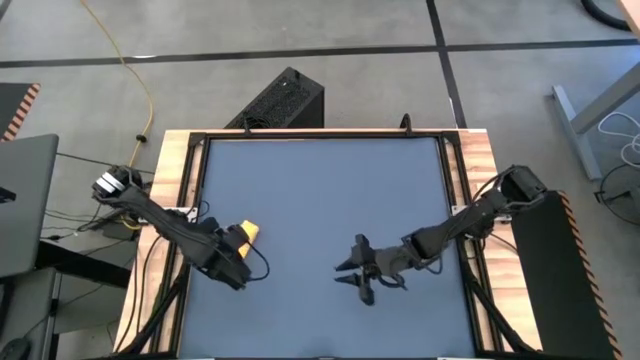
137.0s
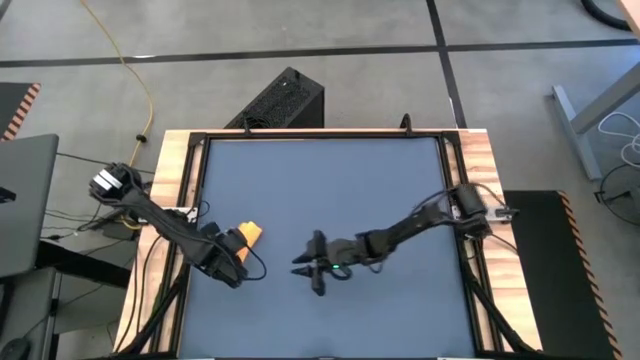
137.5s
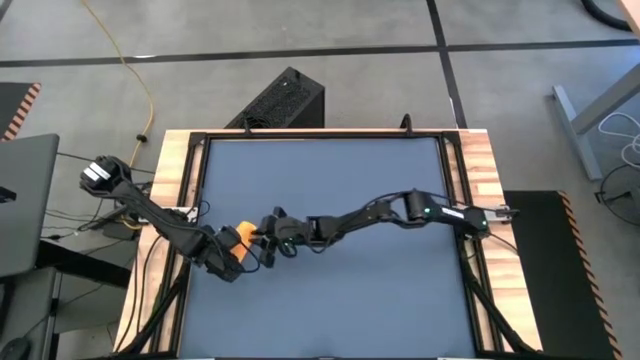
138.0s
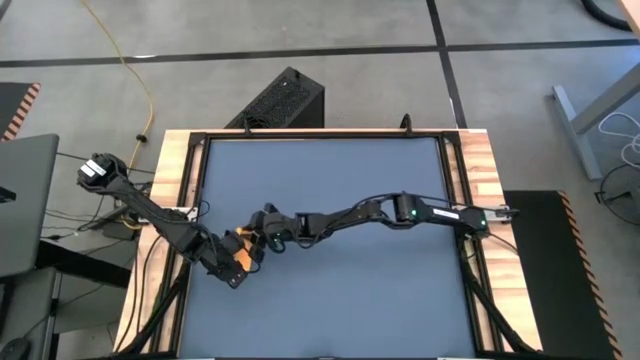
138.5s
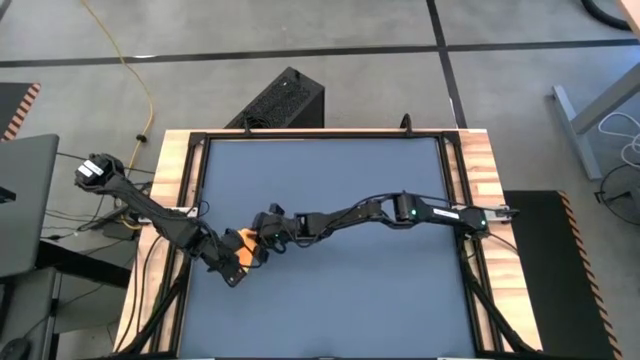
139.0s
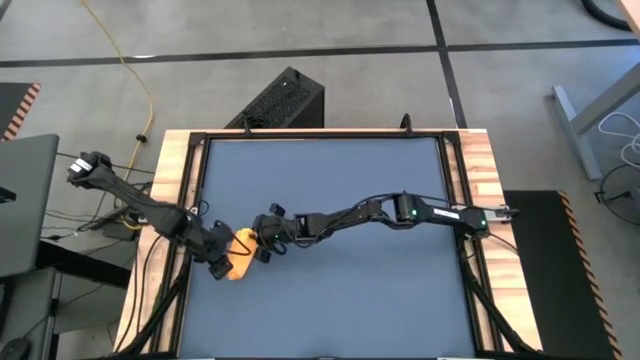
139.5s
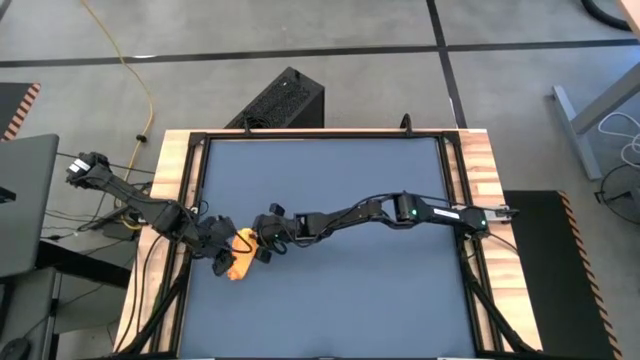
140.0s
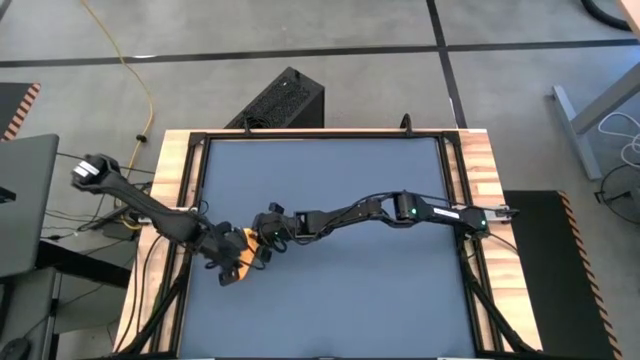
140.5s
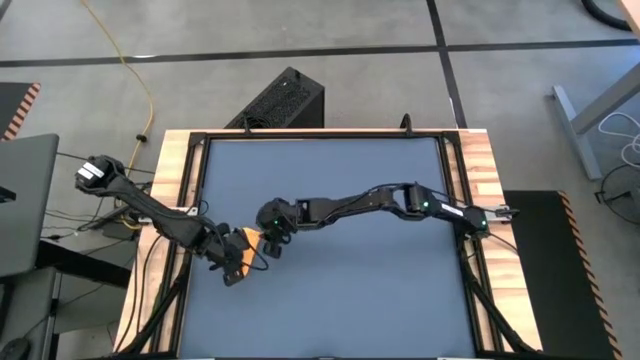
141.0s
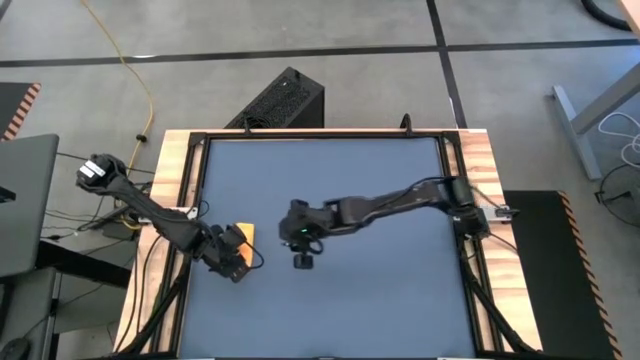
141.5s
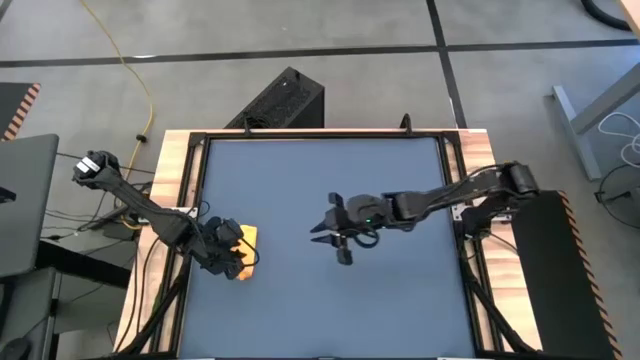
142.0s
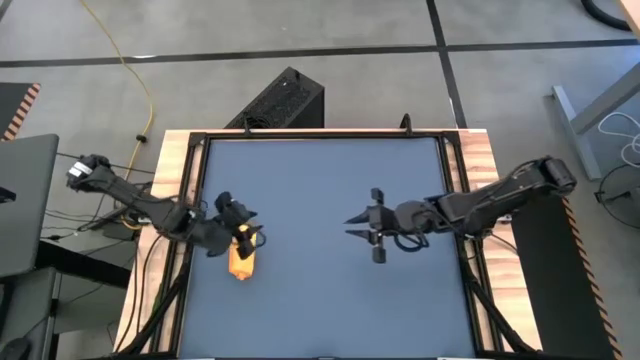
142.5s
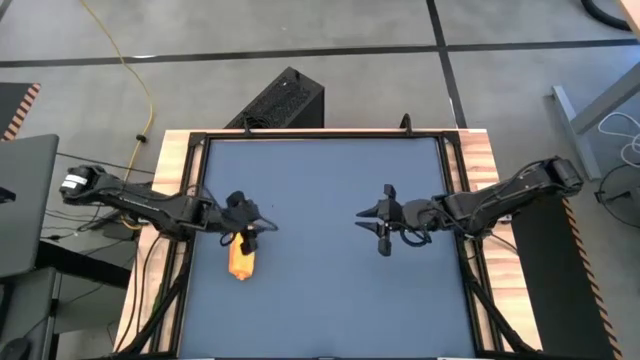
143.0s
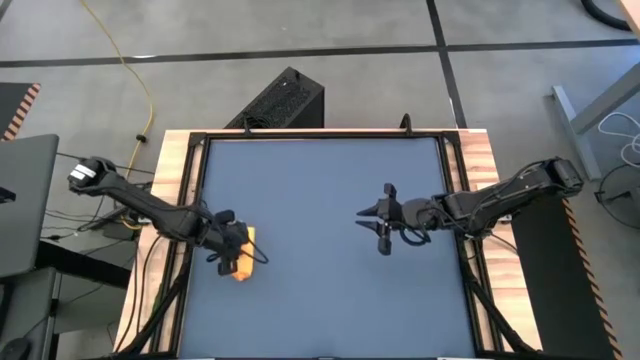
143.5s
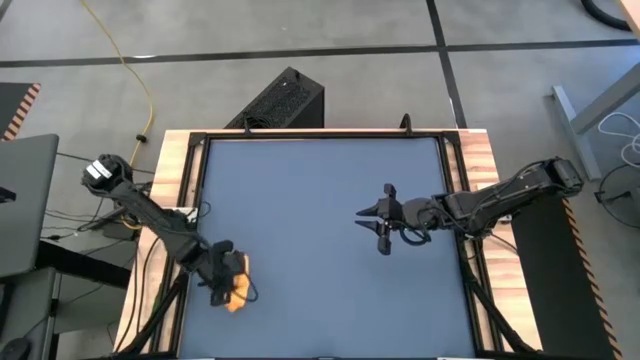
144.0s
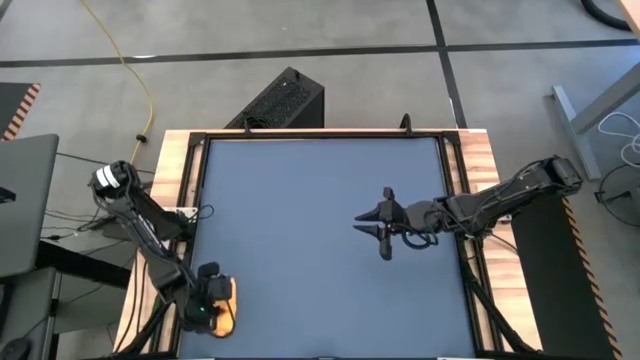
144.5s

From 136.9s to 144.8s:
Task: Roll towel
Move the rolled orange microfiber towel to the bottom left of the table

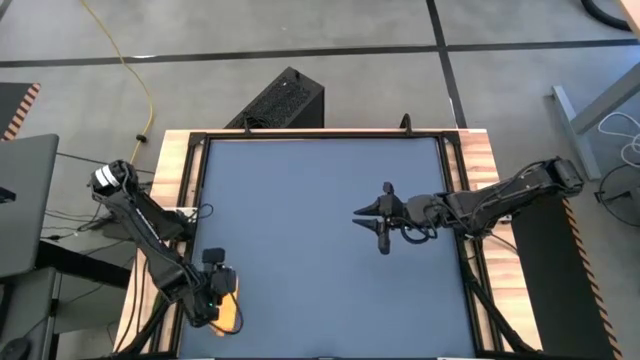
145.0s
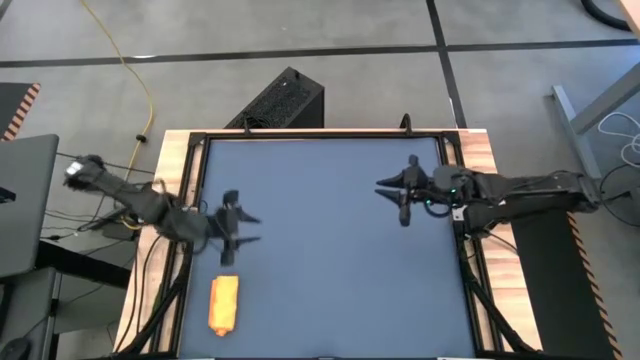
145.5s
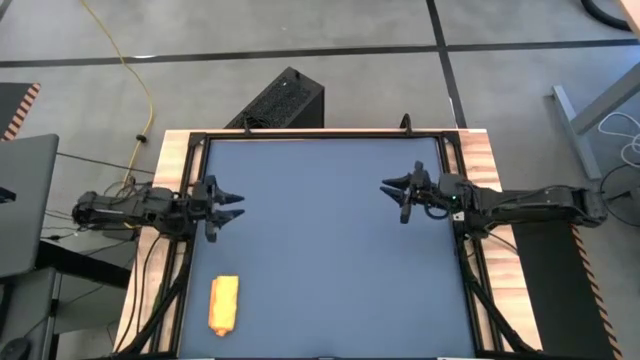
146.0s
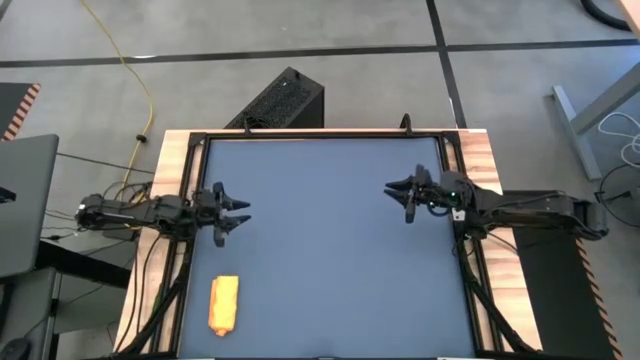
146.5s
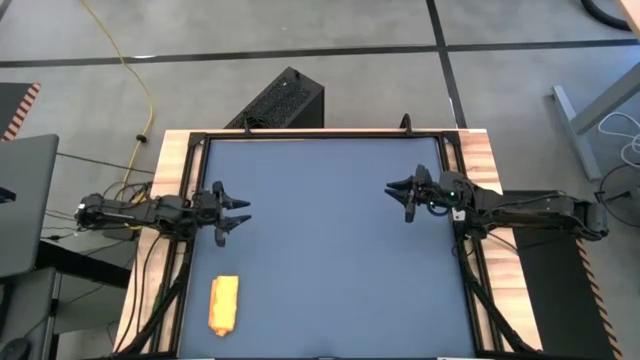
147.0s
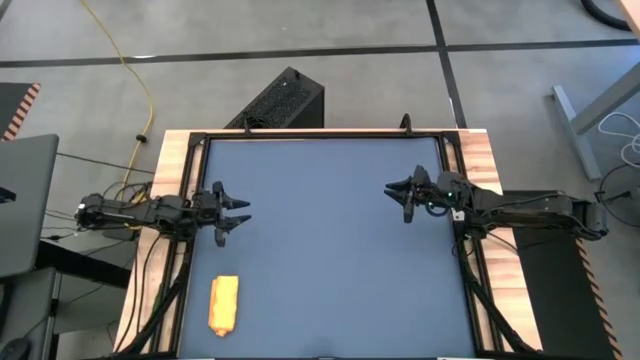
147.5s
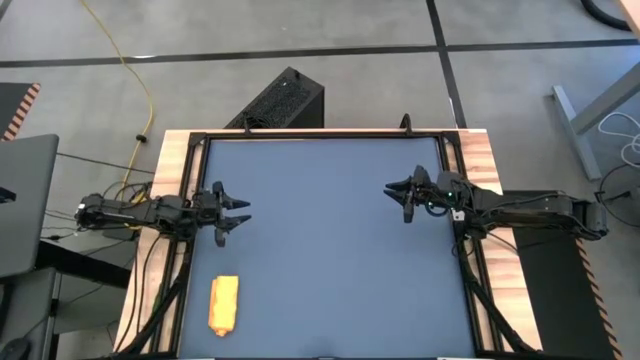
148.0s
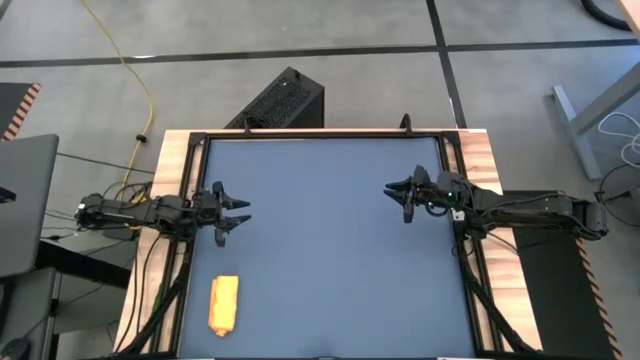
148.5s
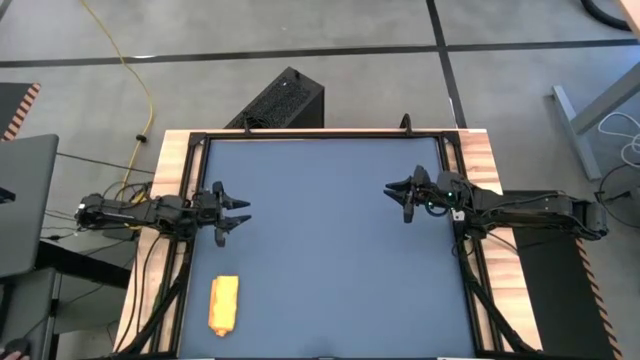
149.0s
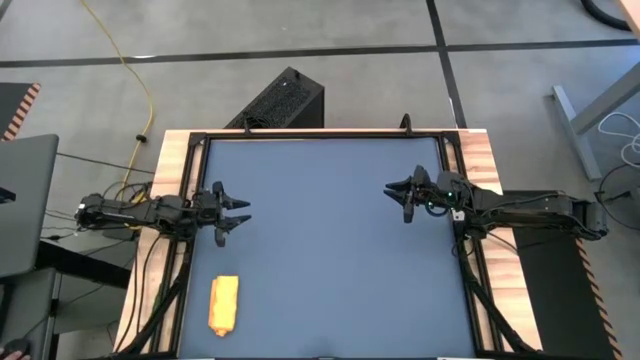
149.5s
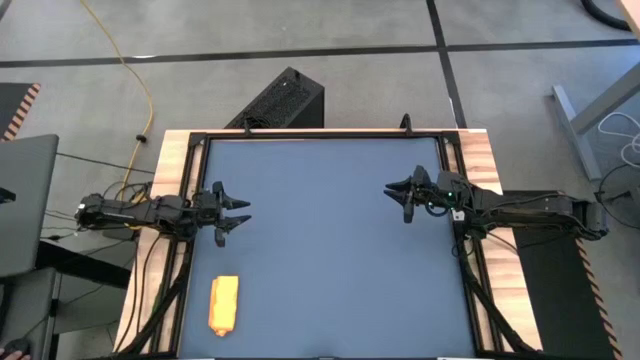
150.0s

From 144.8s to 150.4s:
Return to Home Position

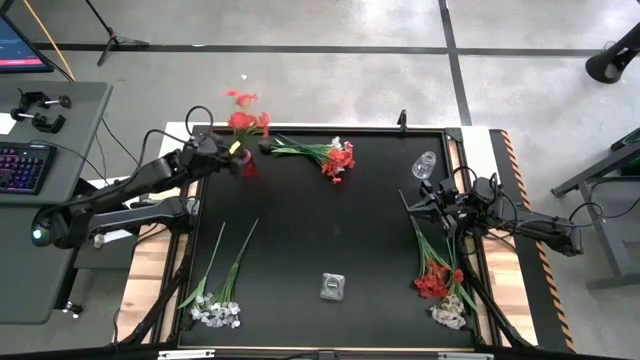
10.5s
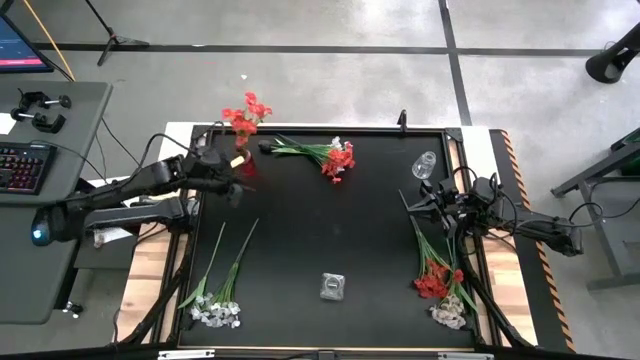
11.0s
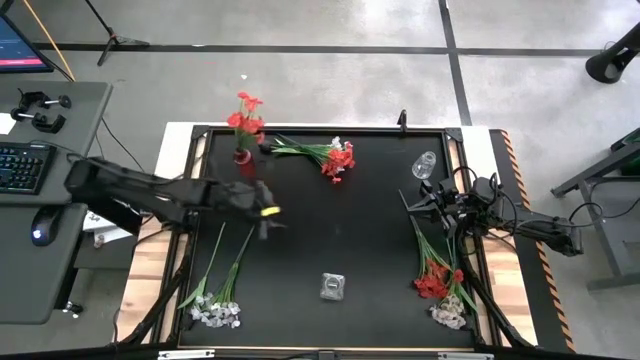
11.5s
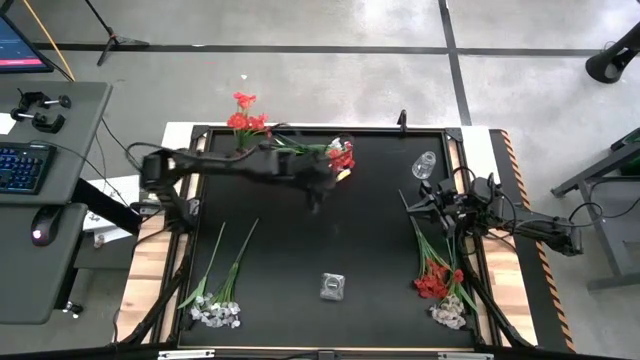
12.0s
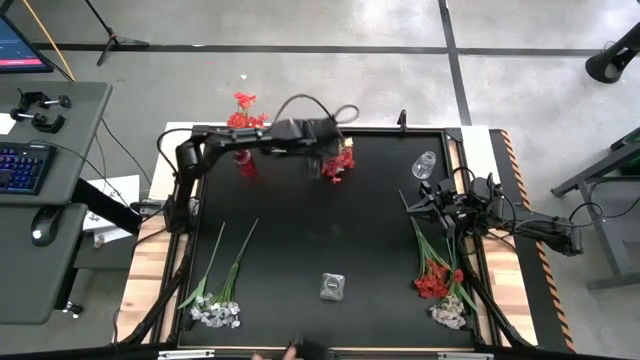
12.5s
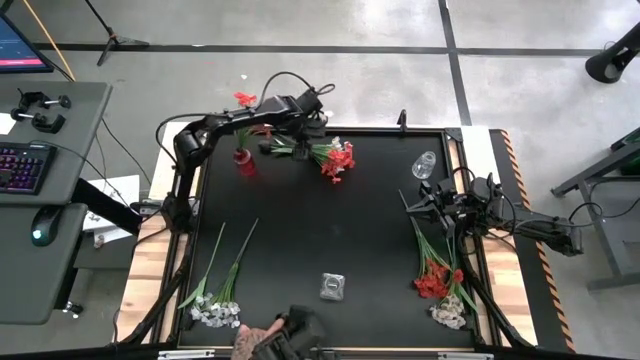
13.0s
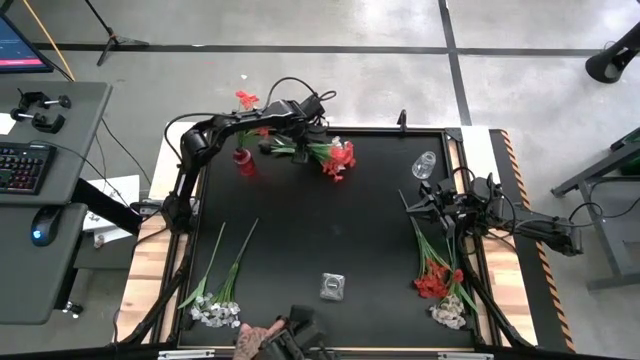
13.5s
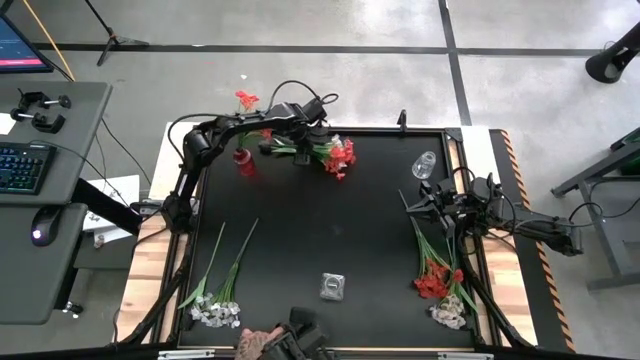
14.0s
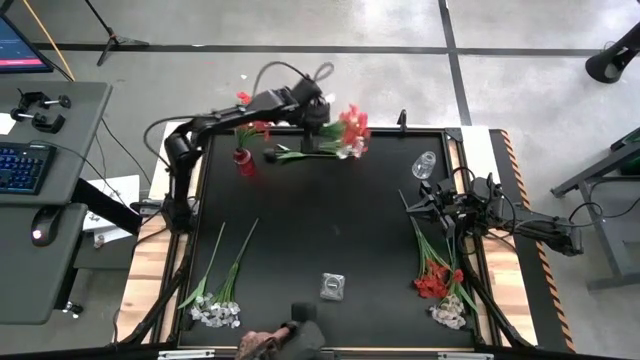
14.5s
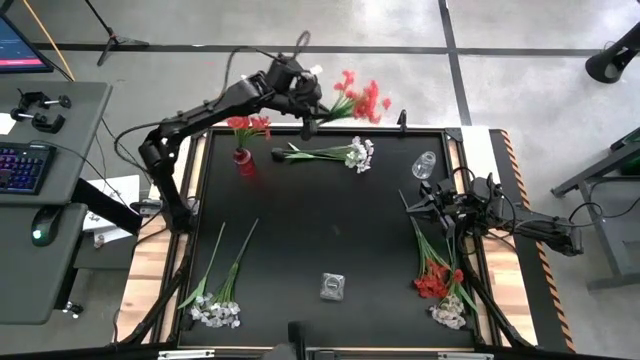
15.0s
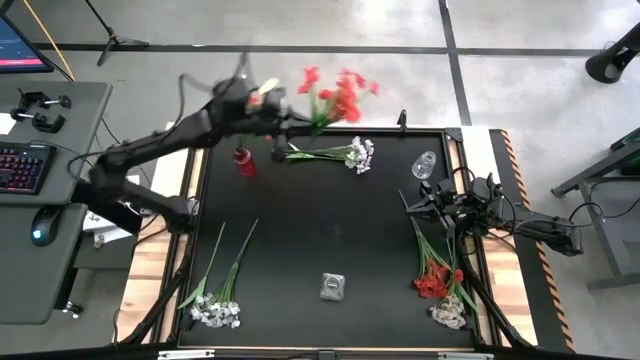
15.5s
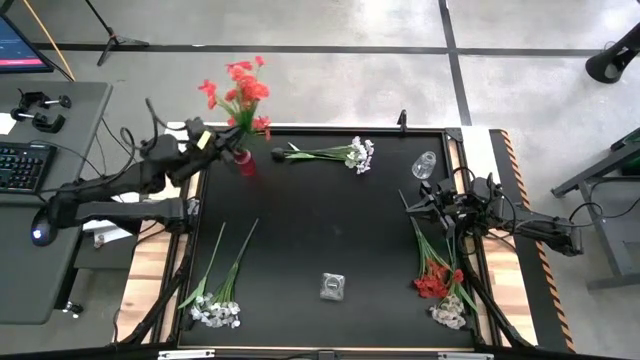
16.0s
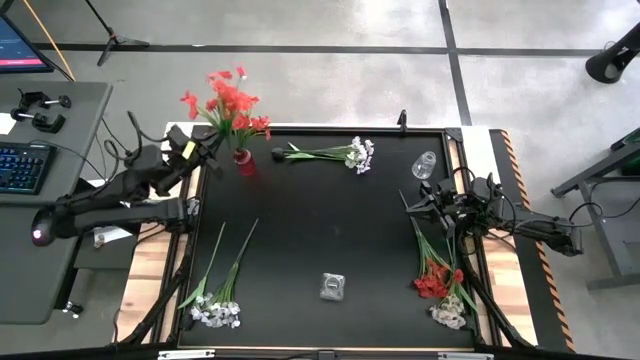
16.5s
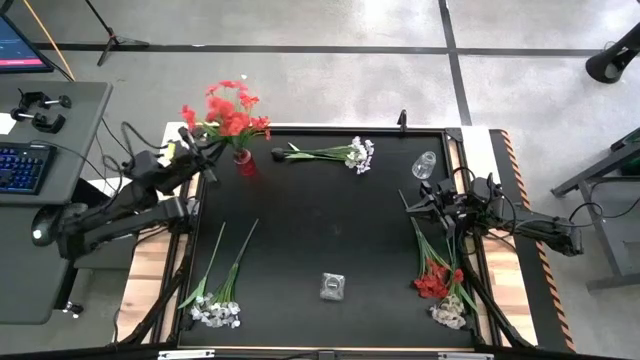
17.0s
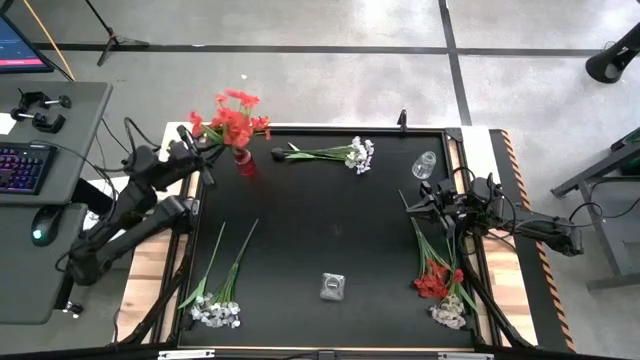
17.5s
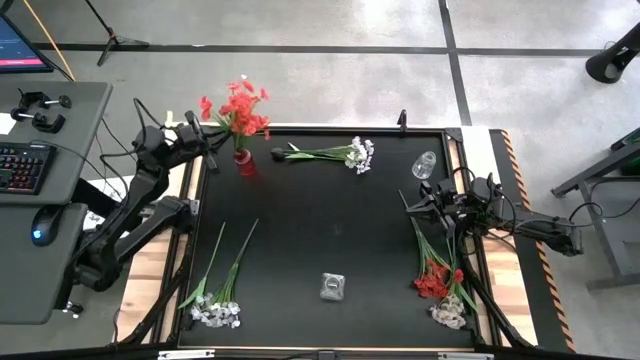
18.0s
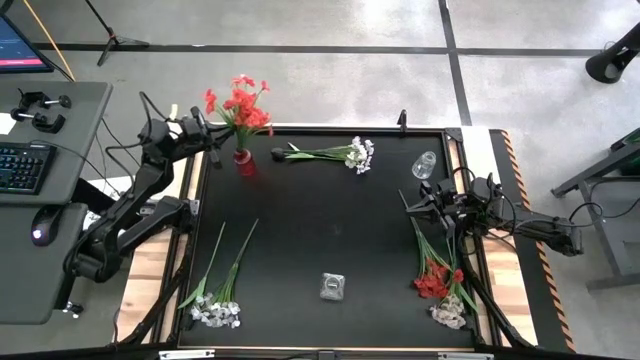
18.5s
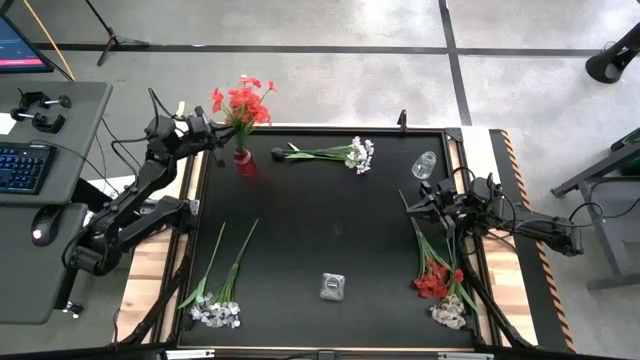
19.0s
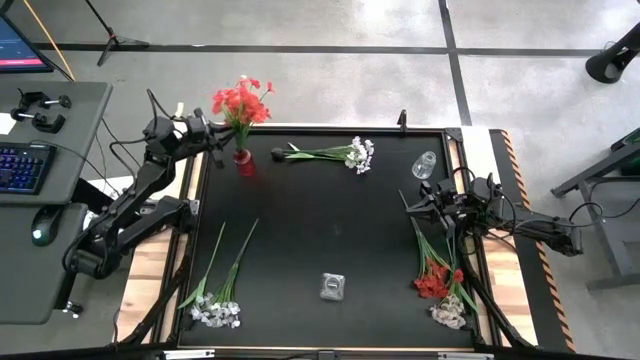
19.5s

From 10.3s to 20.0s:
Task: Sort flowers into vase by color
Put the top orange flowers into the red vase
